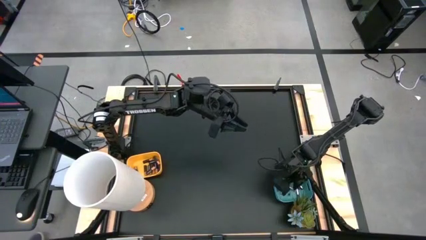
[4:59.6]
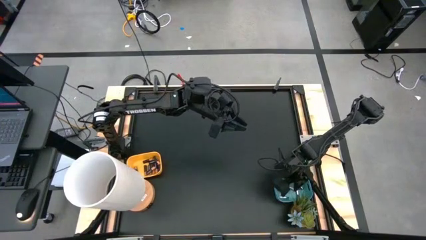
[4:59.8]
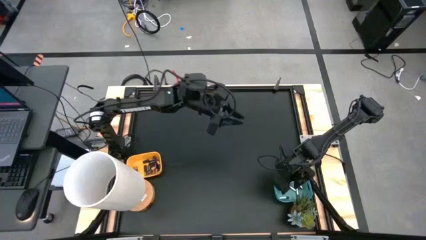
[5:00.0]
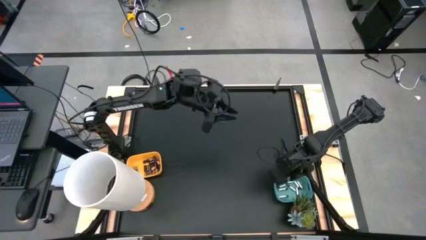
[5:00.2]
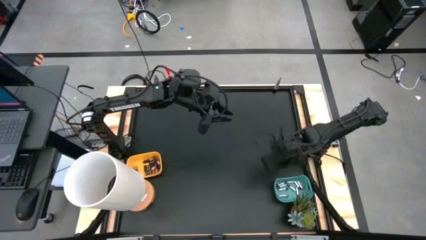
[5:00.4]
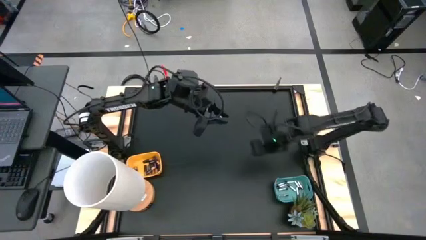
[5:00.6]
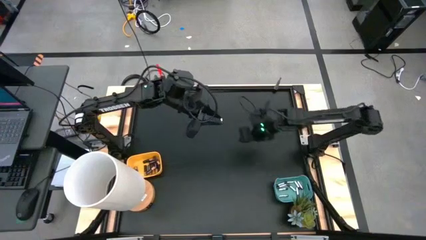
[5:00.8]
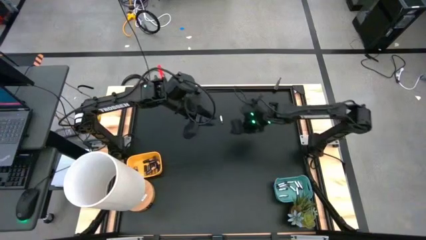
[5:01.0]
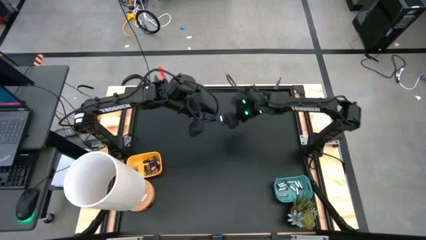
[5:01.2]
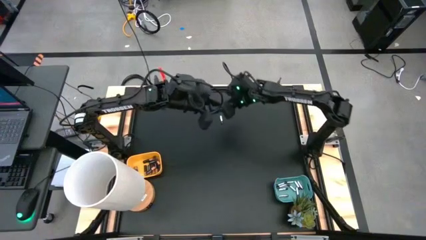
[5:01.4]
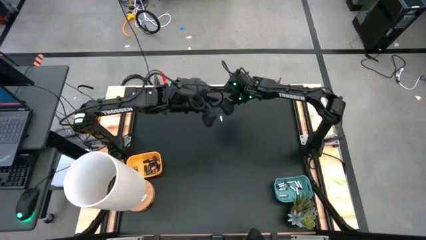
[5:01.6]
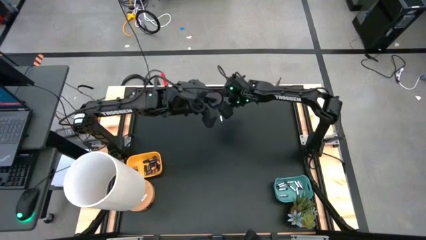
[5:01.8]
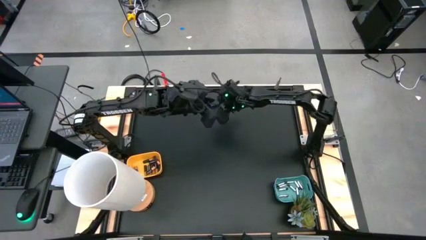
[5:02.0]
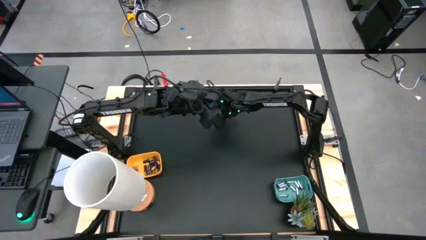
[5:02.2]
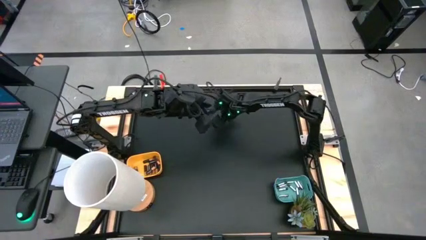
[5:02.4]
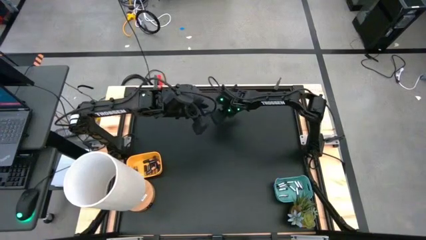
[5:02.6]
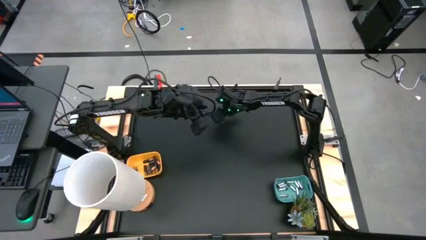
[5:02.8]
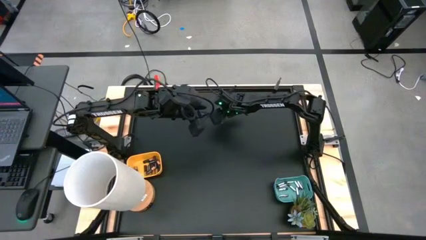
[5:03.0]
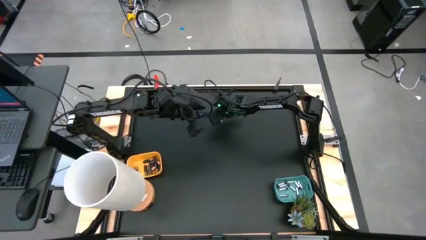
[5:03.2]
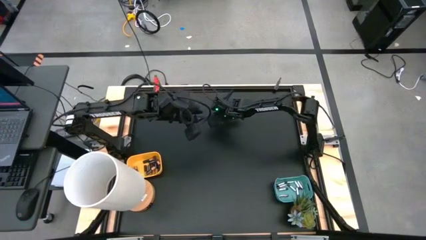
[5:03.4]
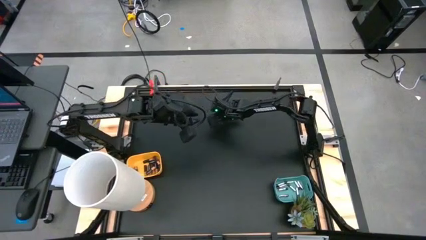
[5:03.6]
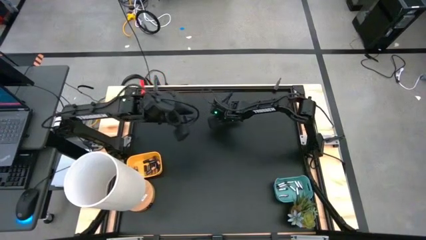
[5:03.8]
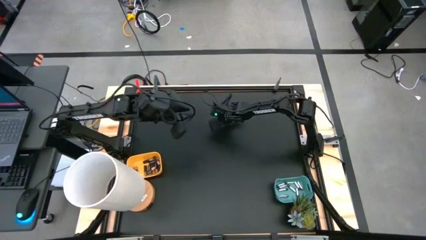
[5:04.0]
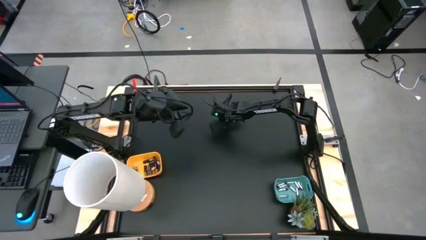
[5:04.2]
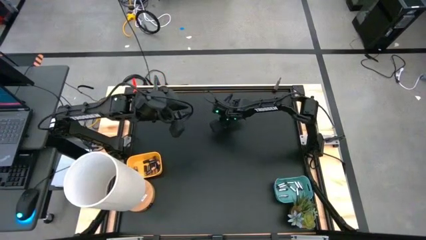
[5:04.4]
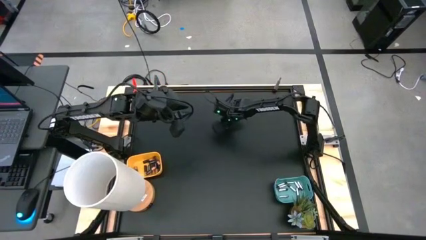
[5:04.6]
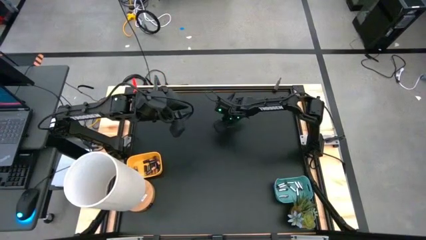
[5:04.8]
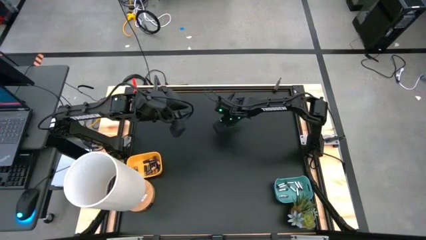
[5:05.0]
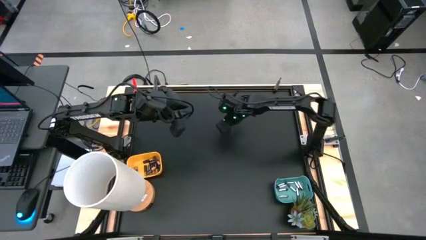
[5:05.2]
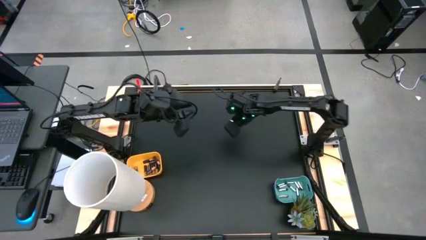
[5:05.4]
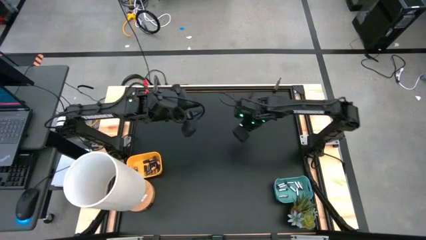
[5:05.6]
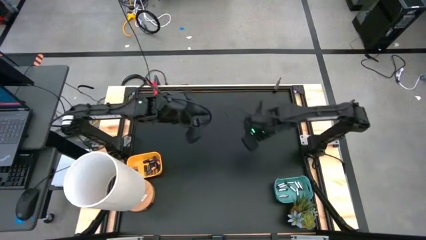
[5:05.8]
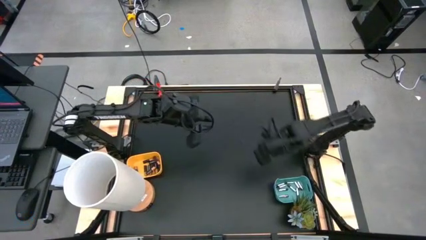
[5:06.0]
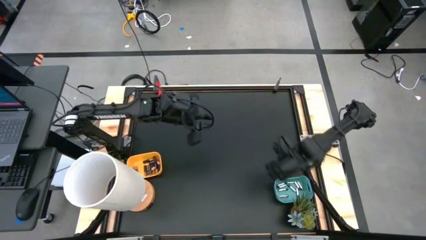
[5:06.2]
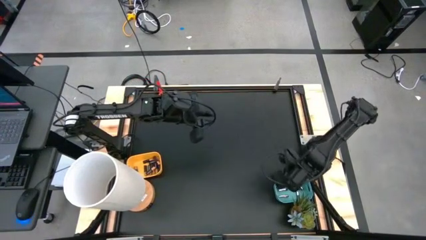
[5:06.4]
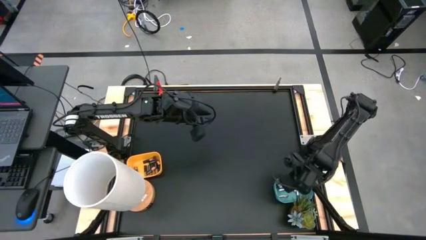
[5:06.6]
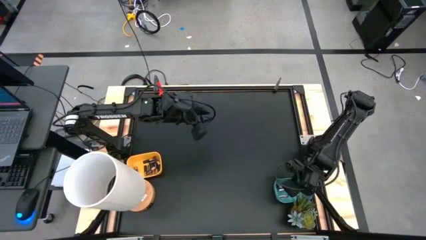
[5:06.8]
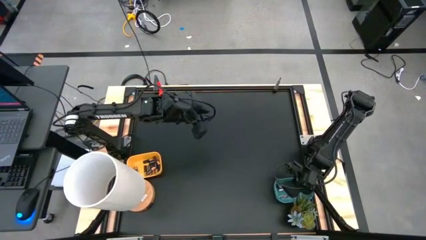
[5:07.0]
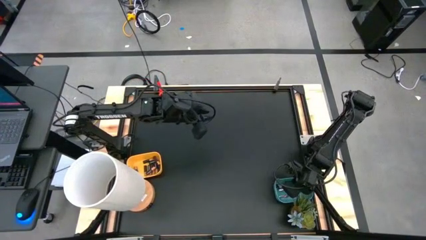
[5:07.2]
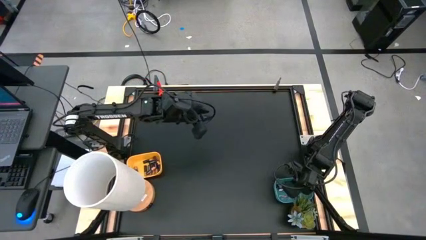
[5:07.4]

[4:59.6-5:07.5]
Task: Sort batteries
Put the silver battery into the green bin

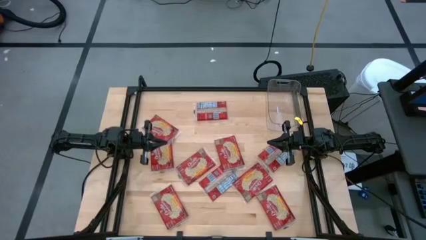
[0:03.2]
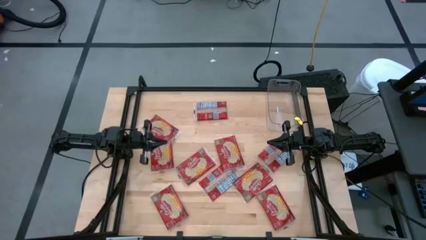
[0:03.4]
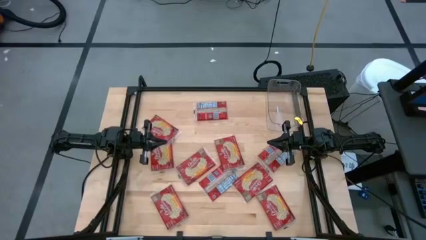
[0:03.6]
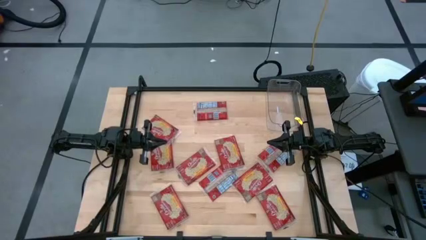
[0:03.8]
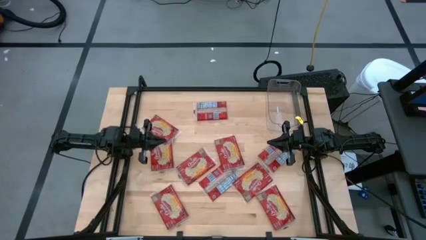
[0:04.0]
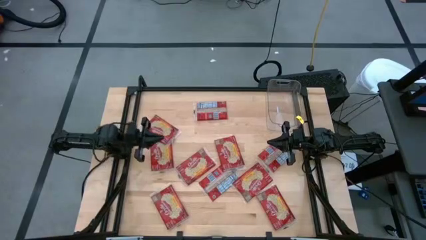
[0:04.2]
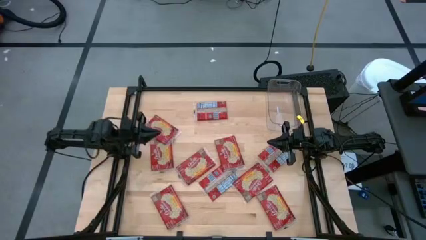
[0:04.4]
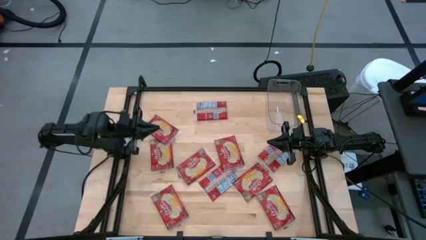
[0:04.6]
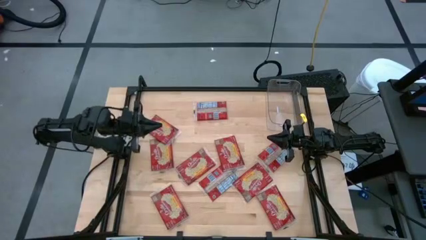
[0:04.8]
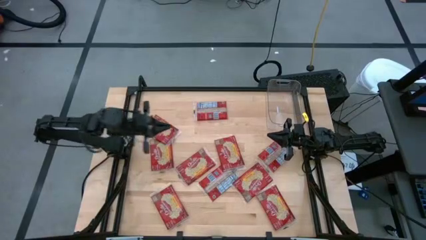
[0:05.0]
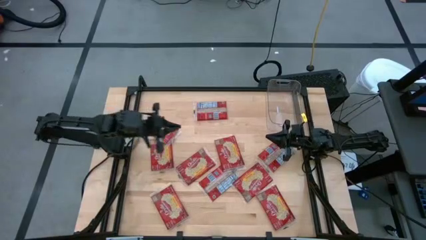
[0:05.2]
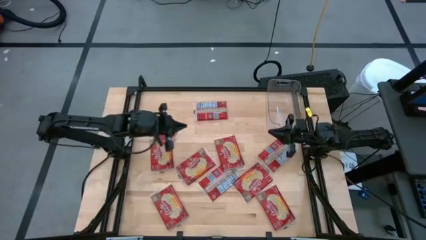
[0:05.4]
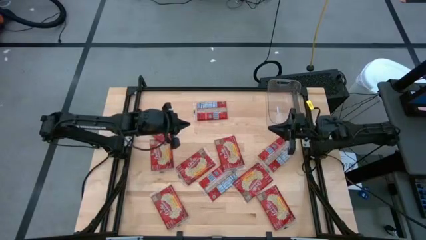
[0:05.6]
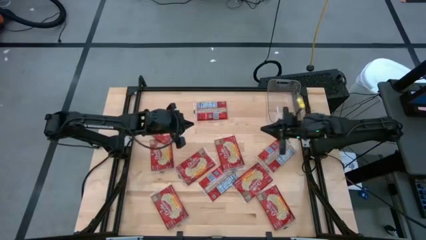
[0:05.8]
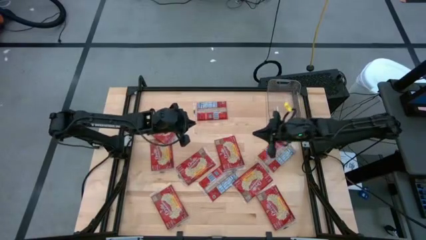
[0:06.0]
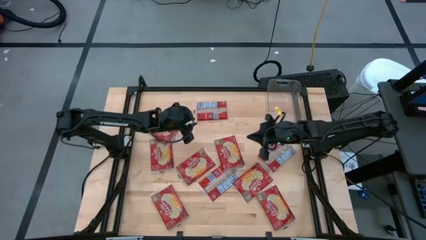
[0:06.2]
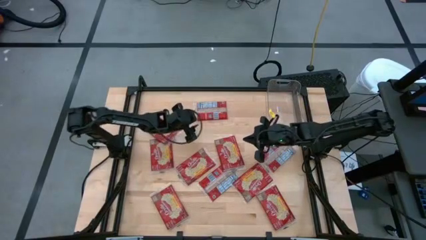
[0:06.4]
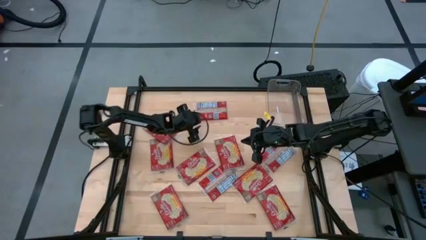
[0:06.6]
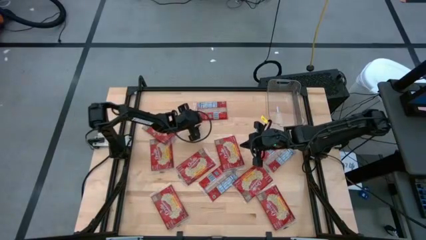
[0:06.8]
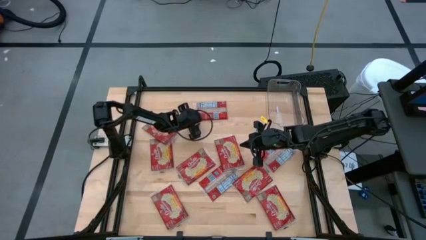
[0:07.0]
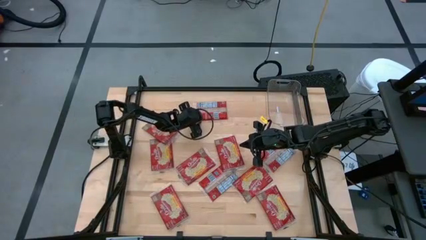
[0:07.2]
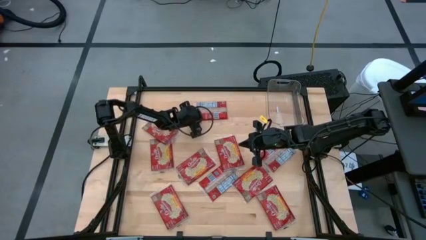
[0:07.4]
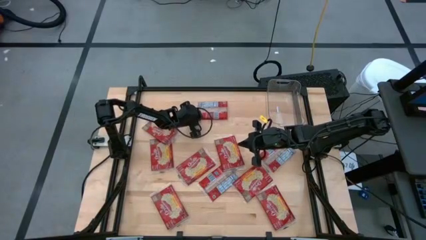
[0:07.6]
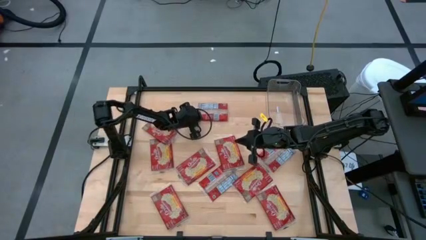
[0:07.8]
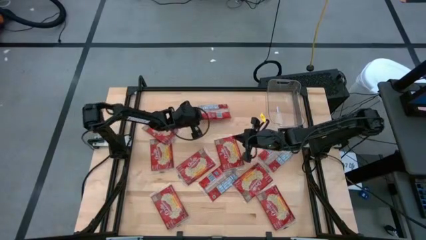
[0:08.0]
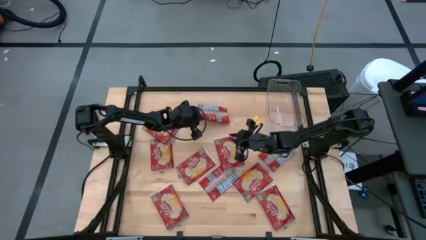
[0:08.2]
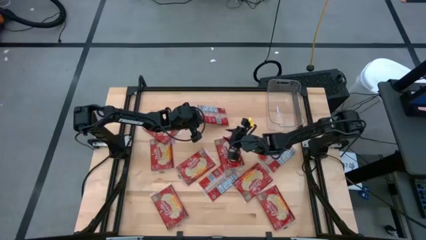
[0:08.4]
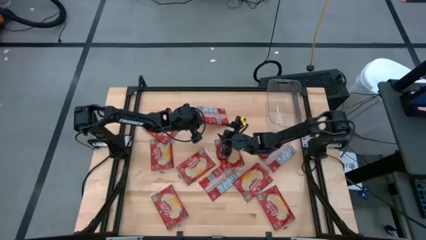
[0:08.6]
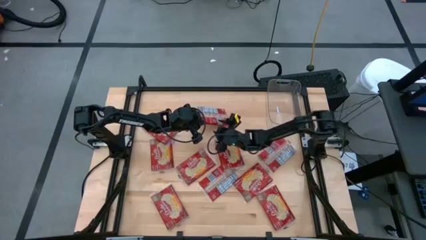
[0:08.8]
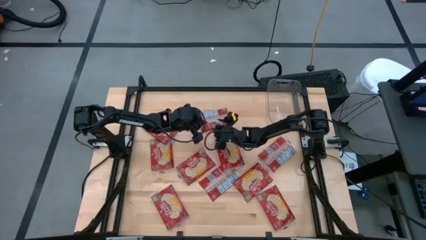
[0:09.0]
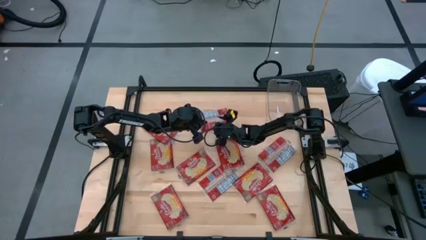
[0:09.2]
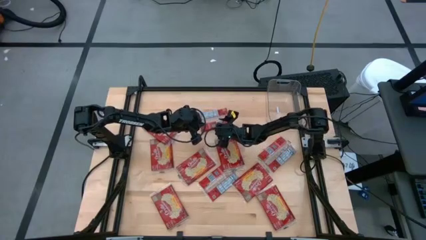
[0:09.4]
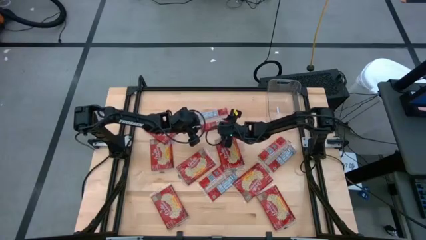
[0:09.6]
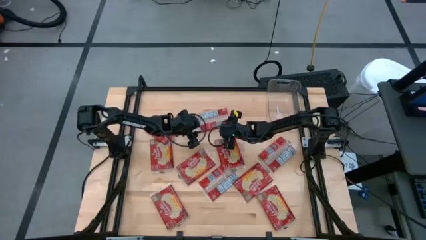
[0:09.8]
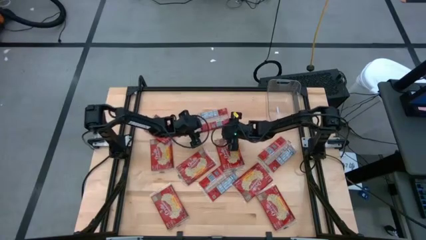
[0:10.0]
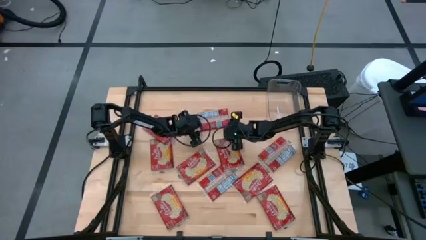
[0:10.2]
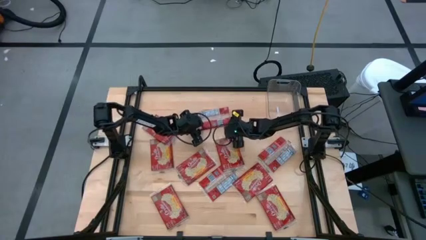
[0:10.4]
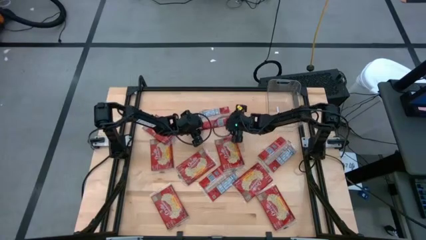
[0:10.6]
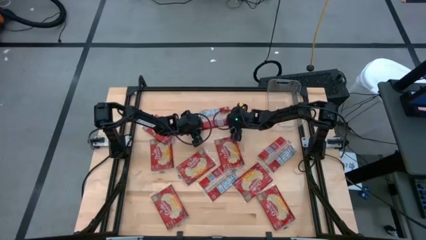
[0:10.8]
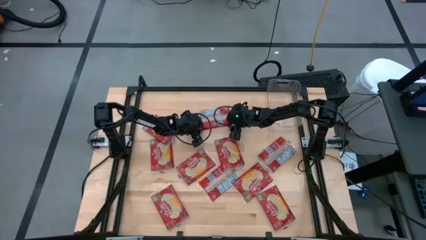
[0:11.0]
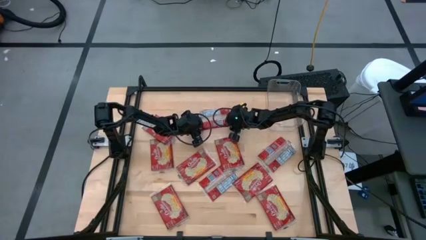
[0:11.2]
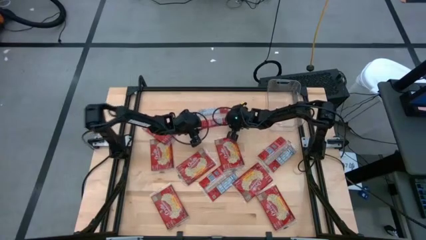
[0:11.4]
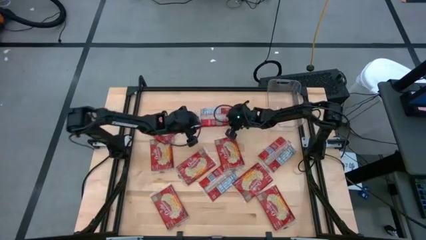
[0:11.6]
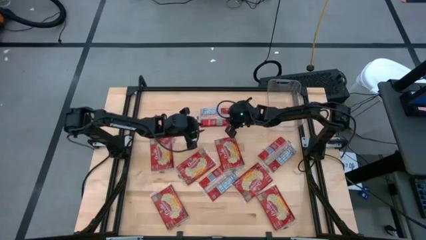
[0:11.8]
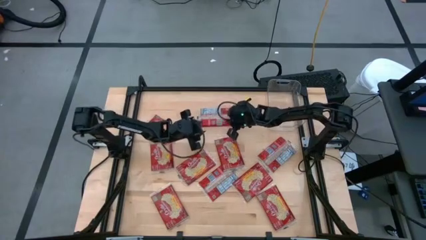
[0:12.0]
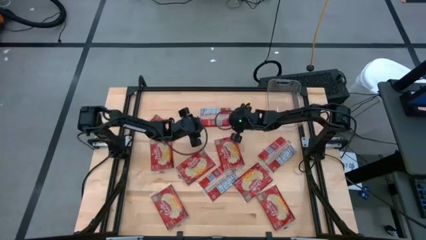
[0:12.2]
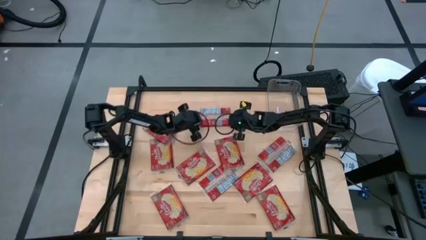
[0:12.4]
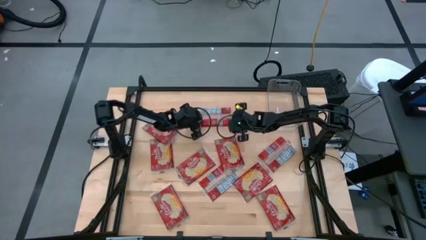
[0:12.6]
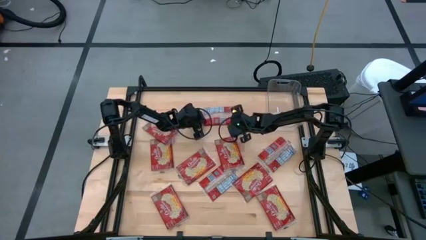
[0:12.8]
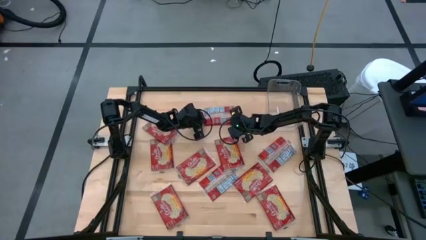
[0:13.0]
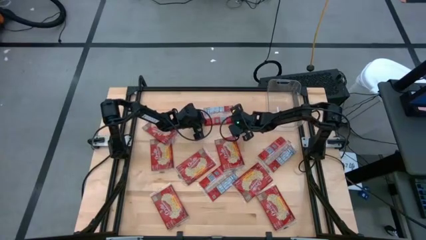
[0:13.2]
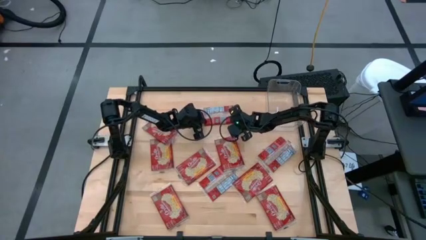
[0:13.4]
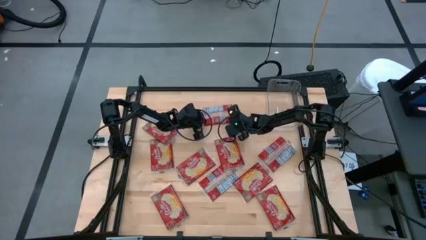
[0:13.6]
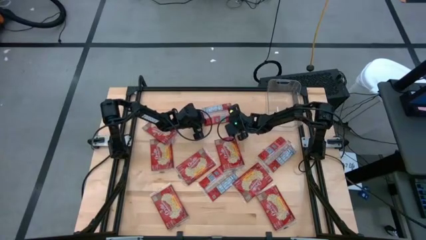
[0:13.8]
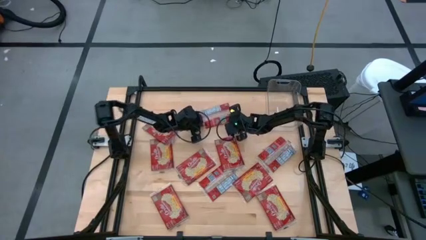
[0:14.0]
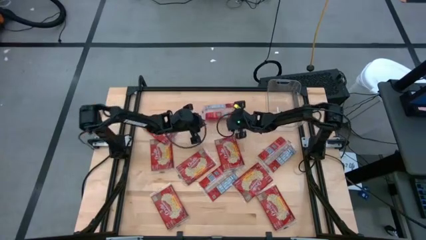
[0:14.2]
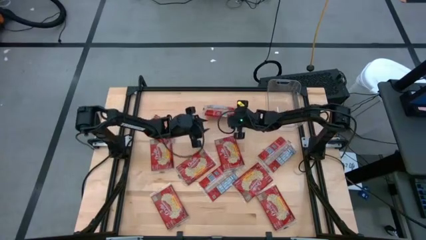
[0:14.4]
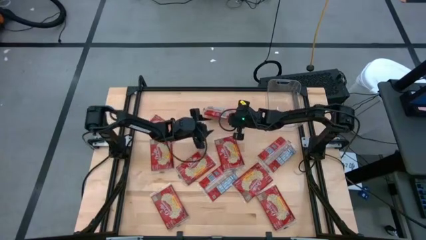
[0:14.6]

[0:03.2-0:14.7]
Task: Sort popcorn bags into baskets
Put the red popcorn bag into the transparent bin
